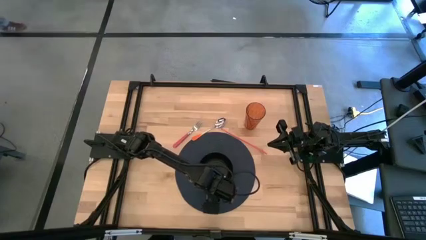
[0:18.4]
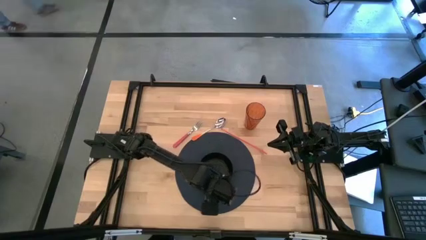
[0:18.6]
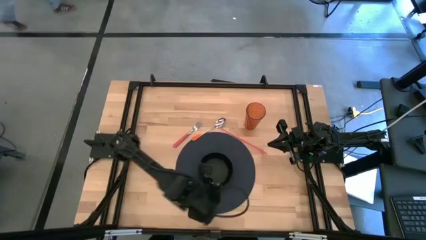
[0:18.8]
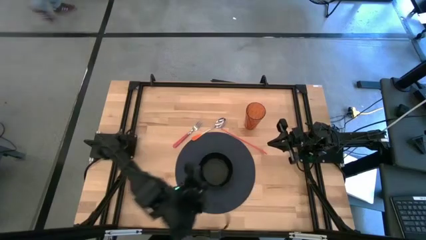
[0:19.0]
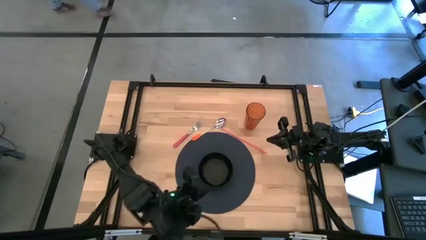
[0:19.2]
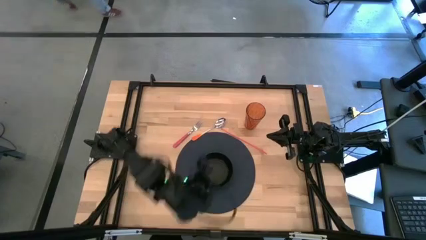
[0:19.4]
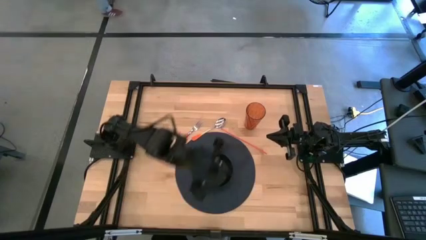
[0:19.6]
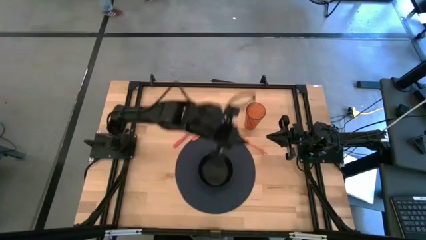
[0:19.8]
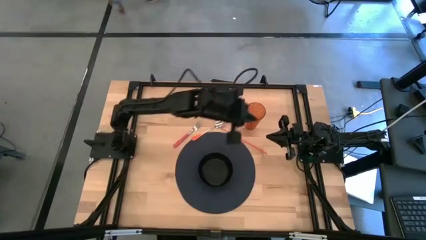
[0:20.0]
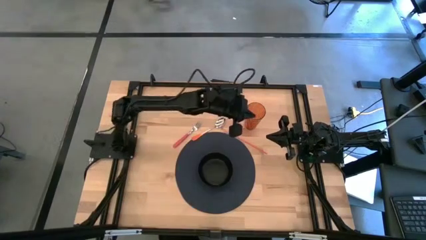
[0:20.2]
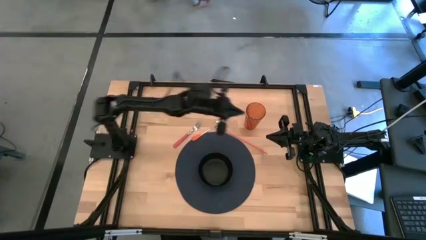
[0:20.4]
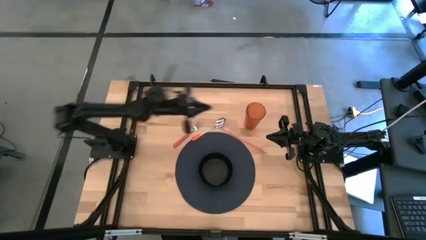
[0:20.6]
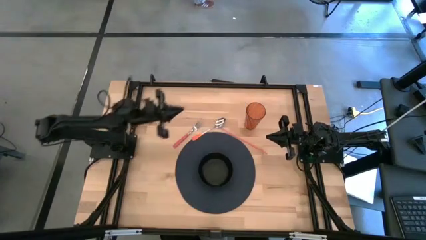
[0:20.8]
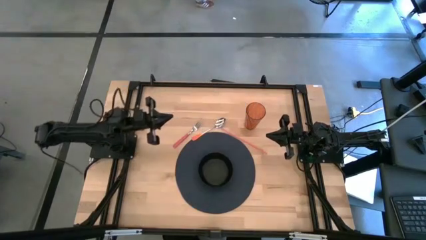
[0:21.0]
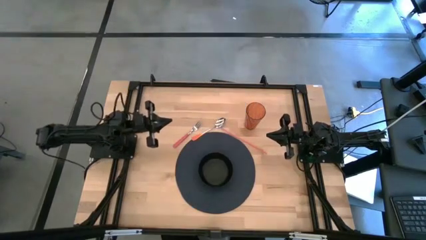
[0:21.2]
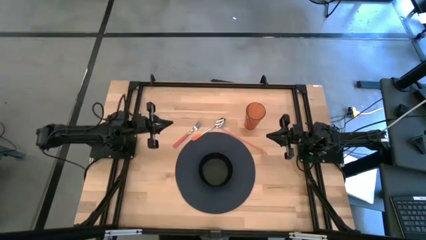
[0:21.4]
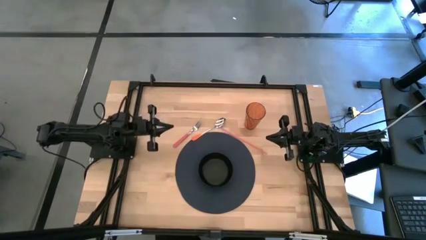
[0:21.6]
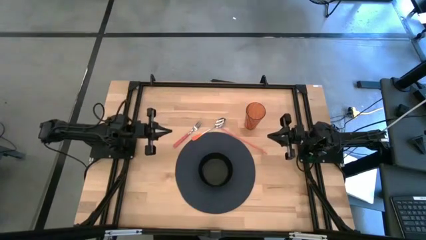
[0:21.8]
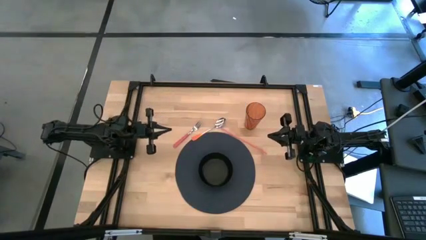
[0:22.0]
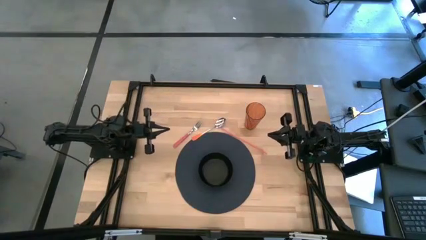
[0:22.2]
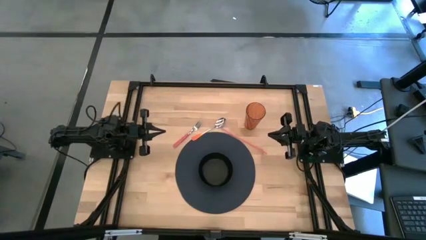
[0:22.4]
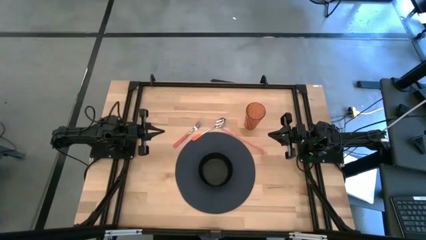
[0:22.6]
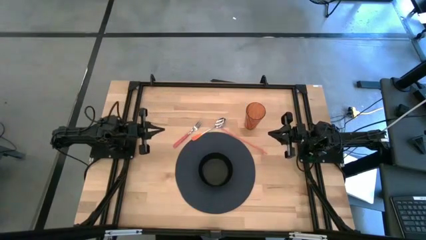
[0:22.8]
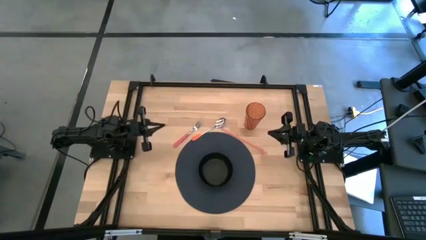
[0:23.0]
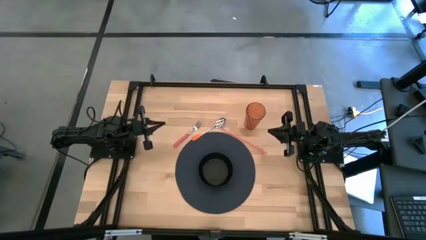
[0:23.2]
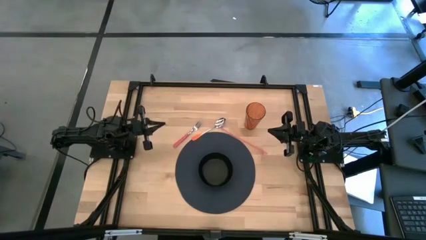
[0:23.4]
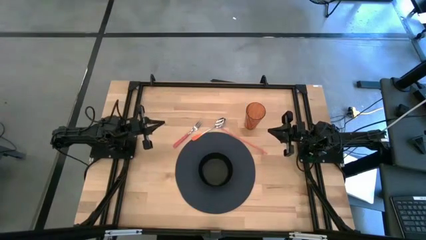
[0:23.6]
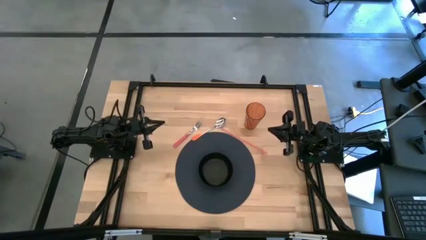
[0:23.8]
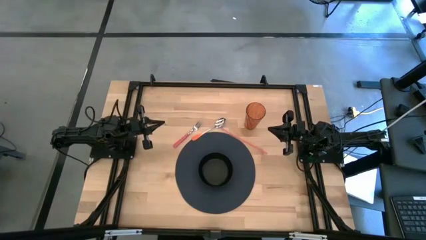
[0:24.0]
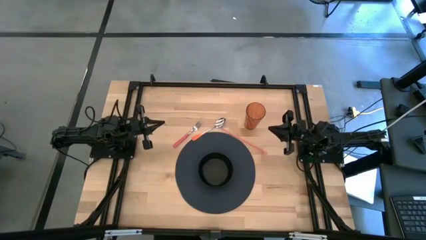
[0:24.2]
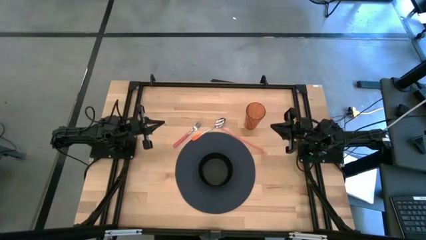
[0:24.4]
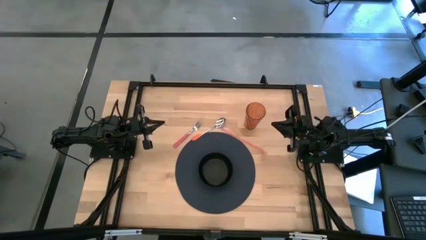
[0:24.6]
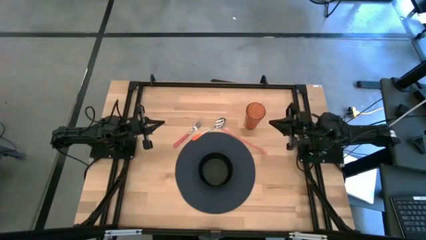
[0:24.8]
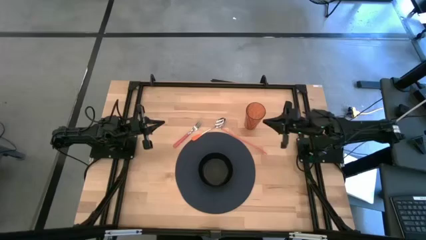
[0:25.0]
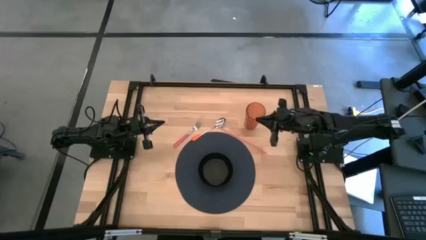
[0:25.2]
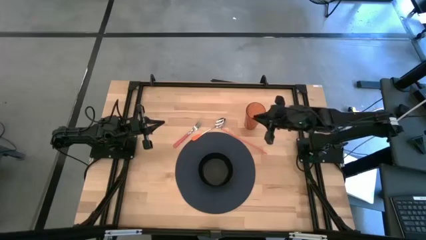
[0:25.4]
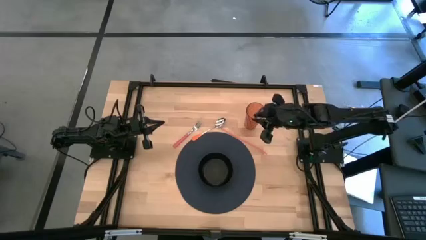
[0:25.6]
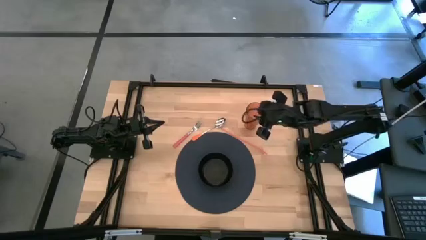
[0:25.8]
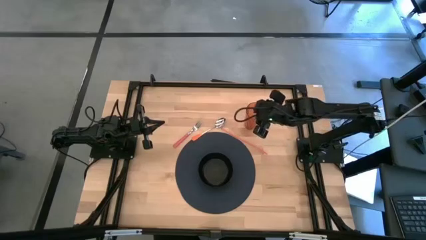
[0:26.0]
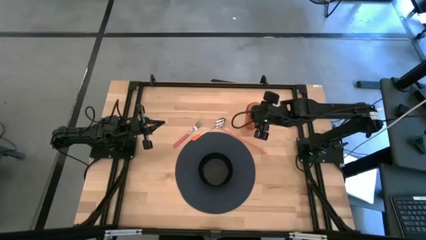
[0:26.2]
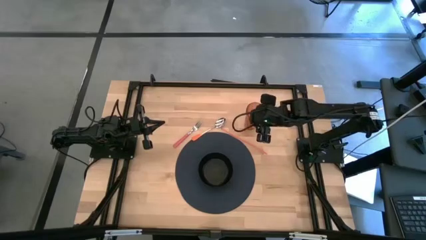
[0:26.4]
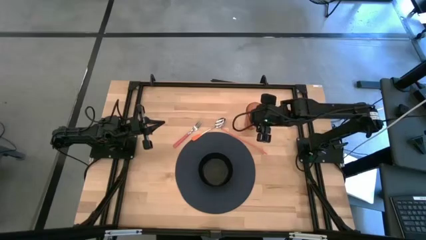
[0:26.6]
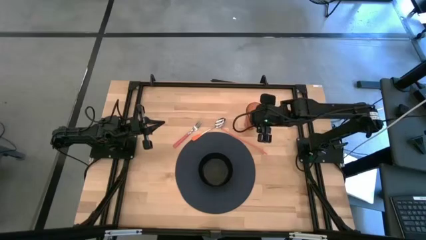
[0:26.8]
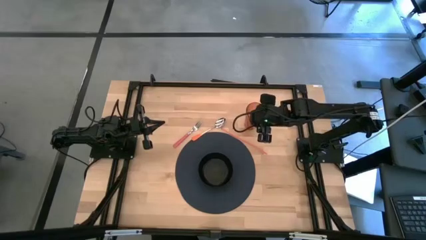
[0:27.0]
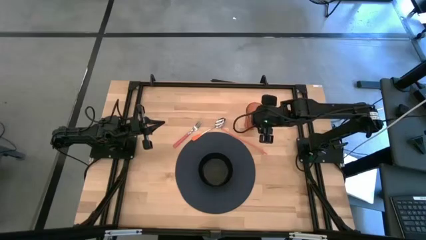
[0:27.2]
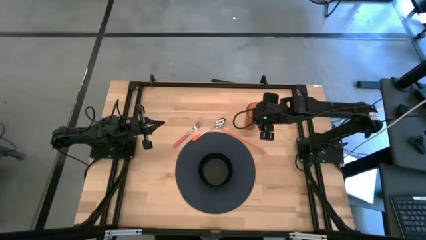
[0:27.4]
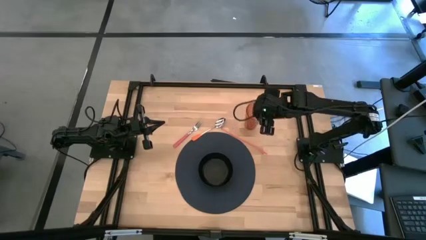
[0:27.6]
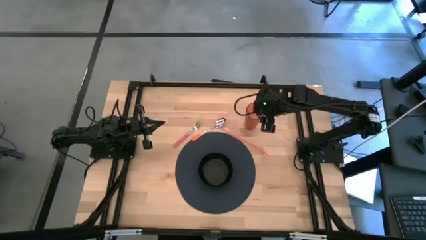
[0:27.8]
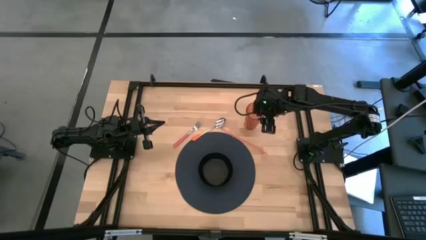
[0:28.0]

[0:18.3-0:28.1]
Task: Pick & Place Utensil
Put the orange cup to the top right of the black bowl on the mat

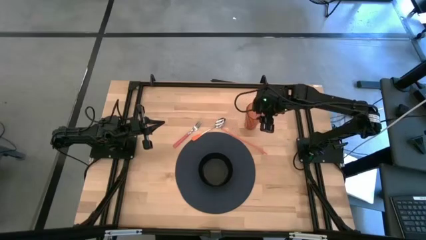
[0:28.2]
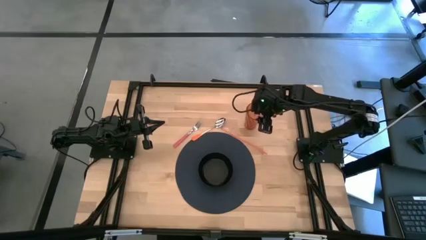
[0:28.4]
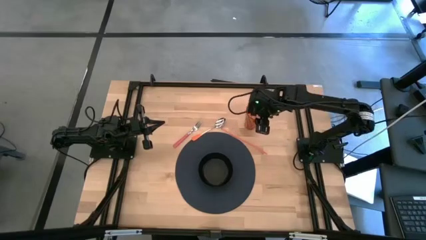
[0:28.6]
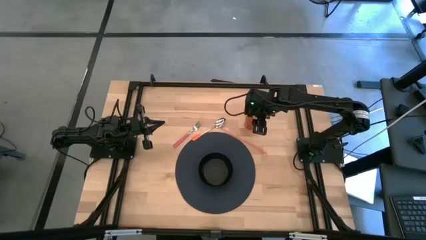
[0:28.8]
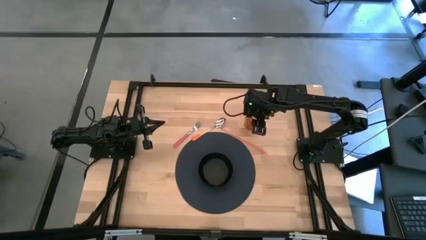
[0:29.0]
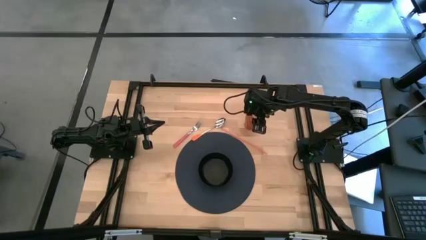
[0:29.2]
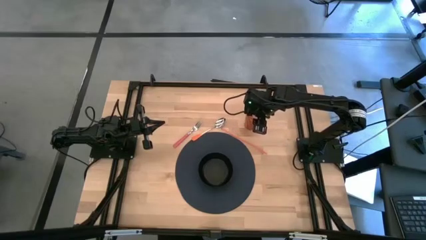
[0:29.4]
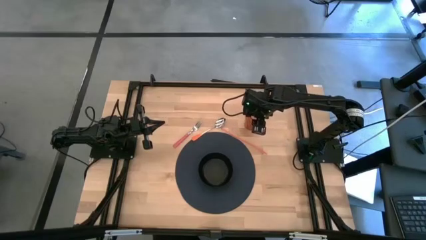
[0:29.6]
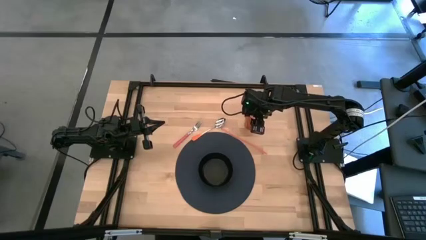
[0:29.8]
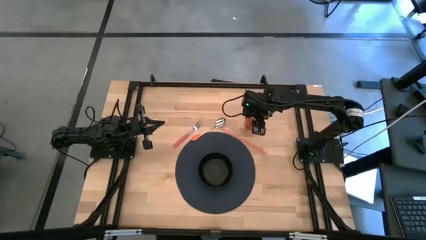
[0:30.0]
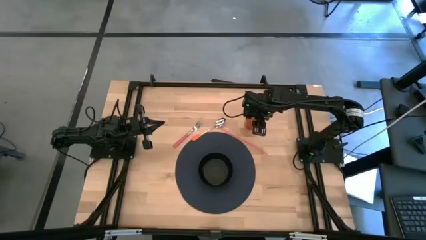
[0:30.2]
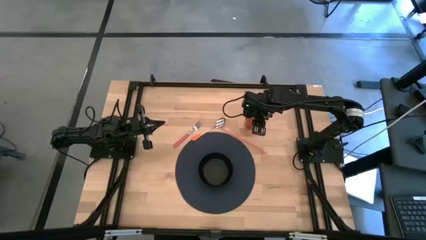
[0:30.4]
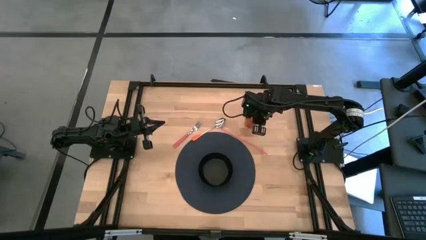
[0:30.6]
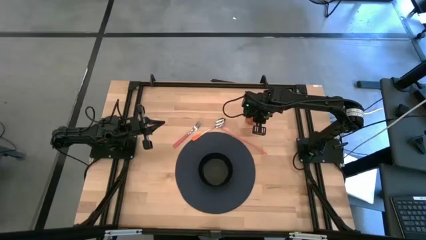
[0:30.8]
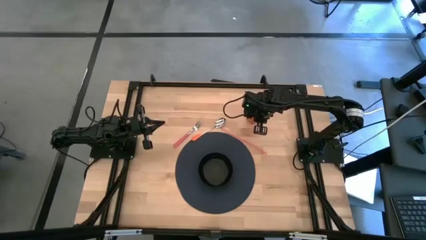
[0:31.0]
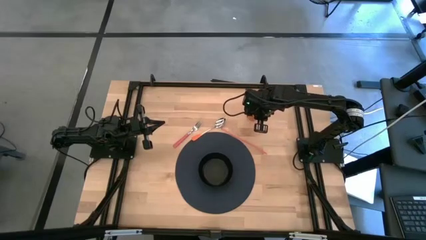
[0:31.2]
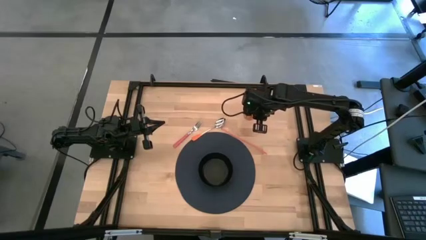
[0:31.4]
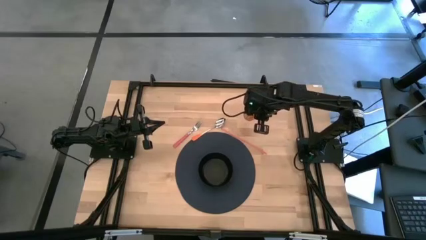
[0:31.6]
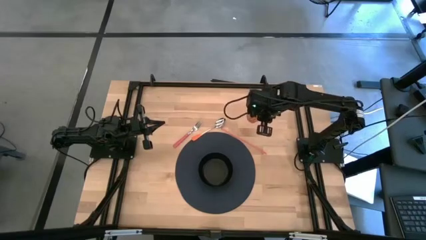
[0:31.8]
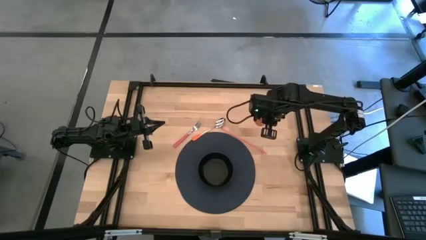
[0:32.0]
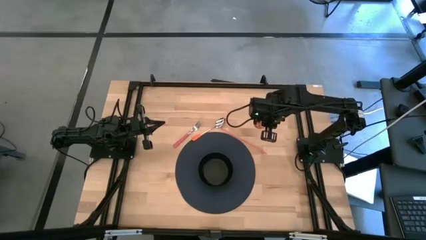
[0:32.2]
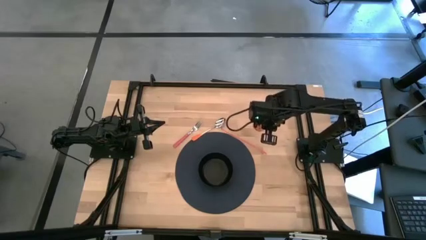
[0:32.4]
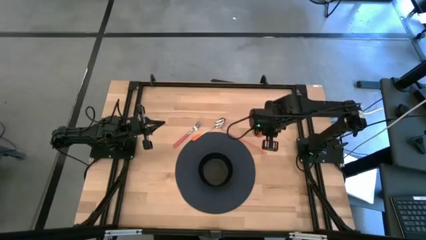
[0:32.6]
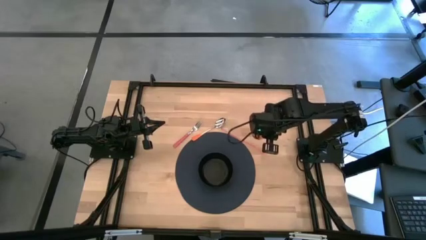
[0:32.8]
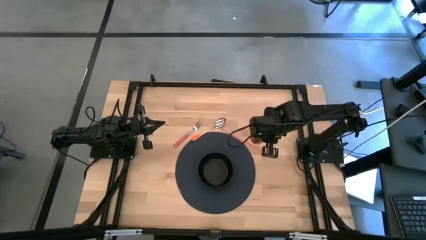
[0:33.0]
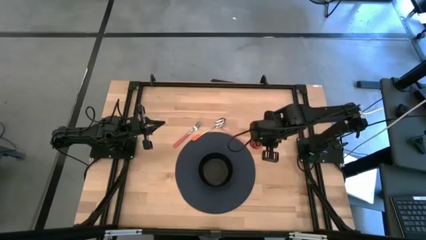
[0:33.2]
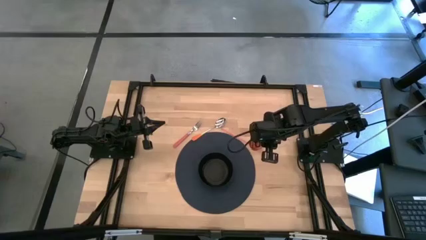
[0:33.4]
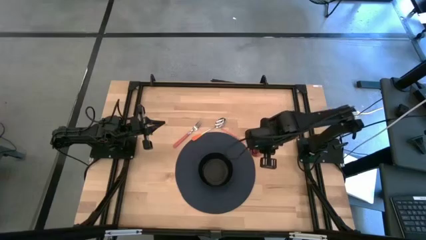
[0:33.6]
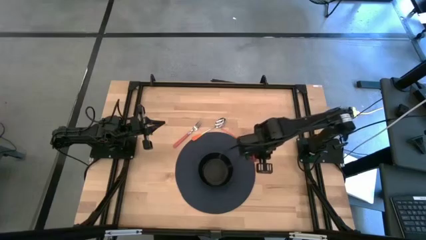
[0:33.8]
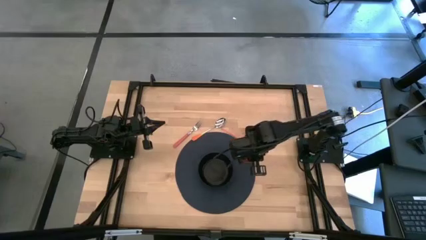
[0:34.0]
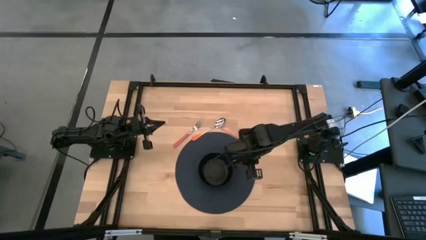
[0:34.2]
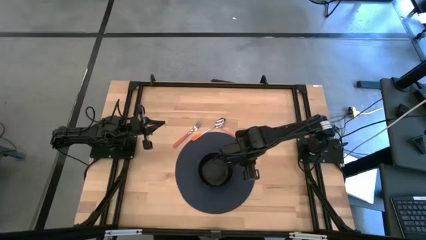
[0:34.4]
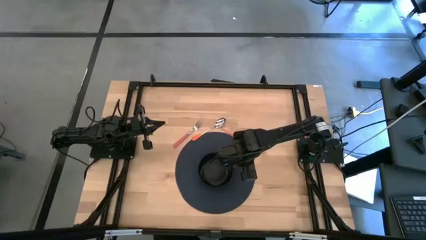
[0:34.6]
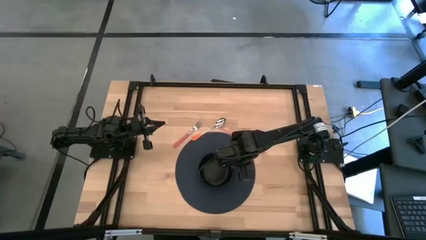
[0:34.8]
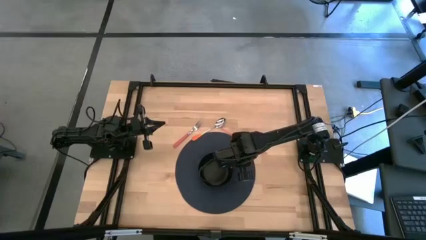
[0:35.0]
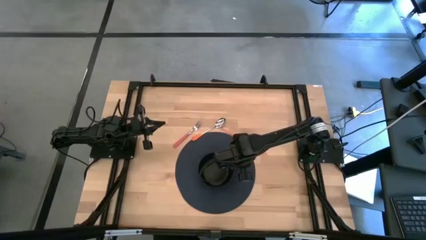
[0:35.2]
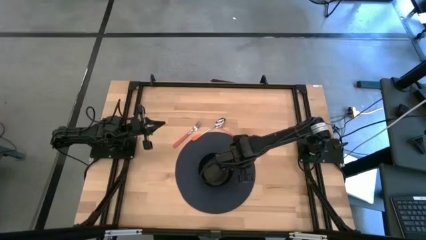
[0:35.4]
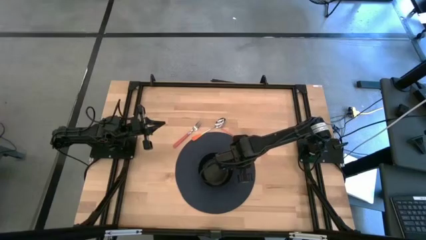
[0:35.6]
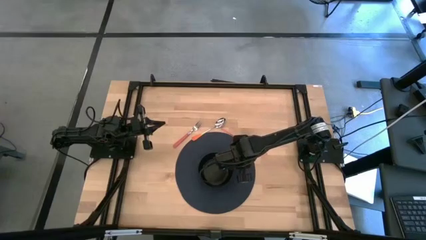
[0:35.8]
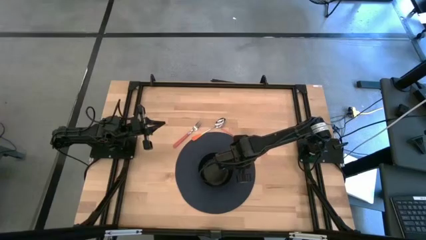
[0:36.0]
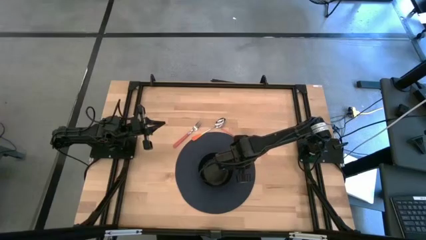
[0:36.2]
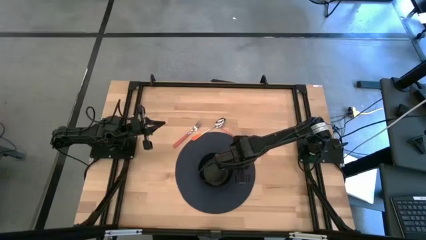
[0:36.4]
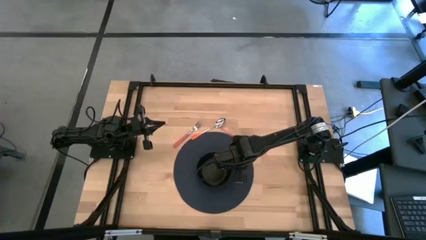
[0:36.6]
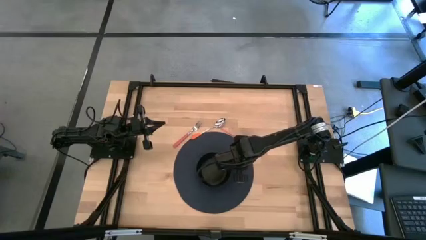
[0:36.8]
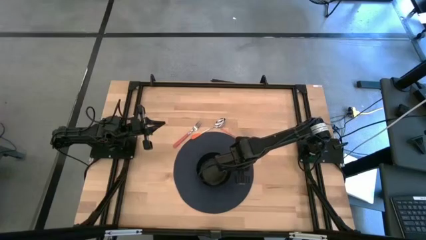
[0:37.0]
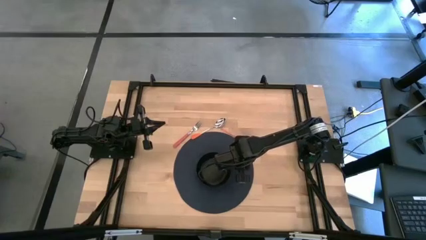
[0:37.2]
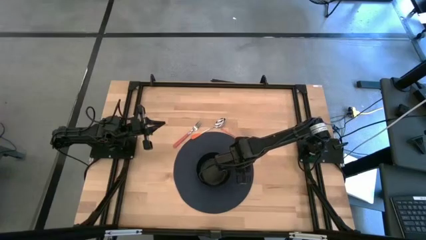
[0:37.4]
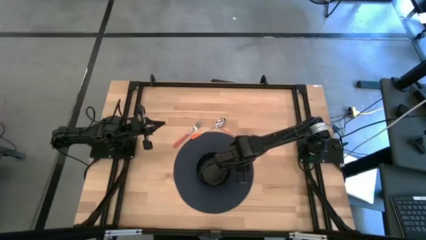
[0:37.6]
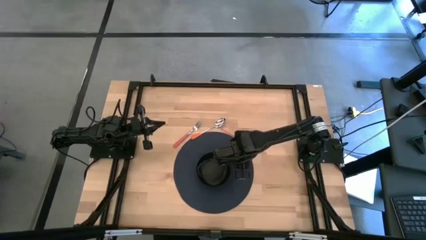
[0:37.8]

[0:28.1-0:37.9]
Put the orange cup to the top right of the black bowl on the mat
